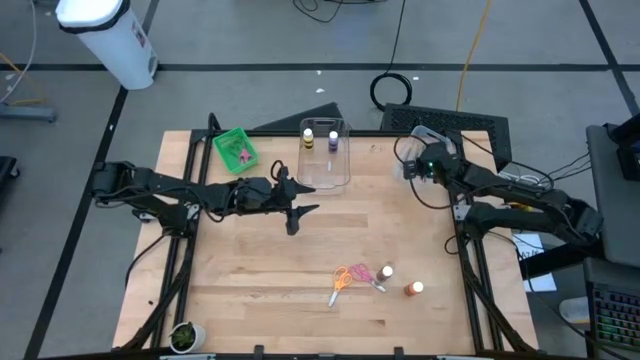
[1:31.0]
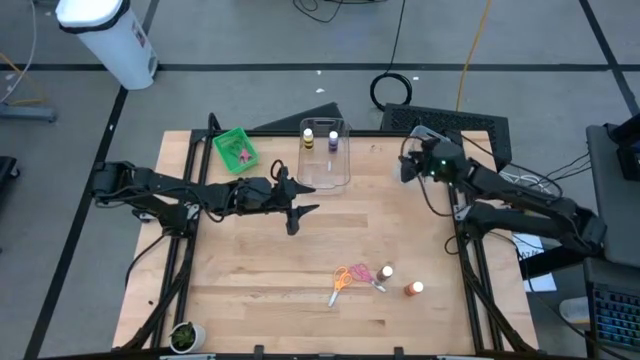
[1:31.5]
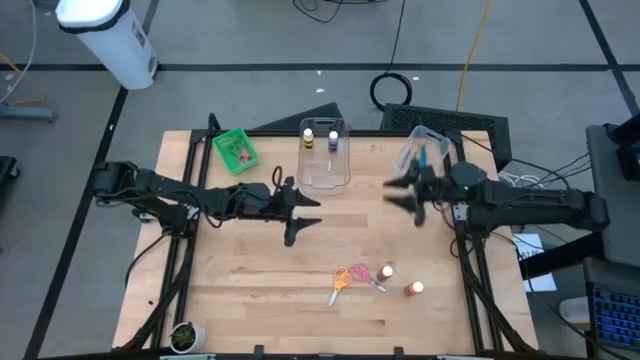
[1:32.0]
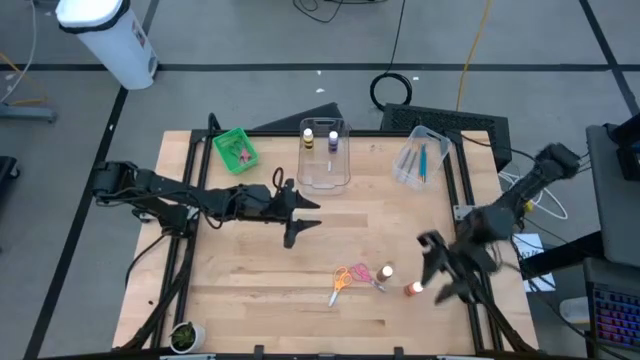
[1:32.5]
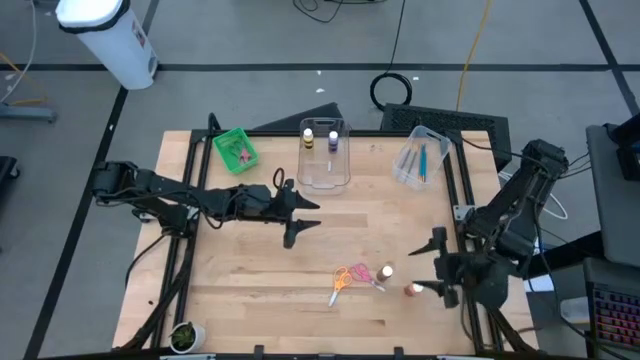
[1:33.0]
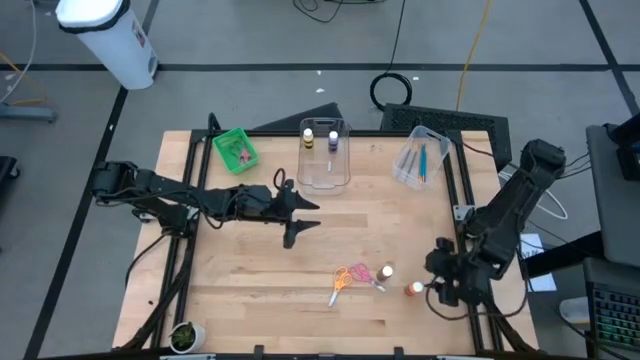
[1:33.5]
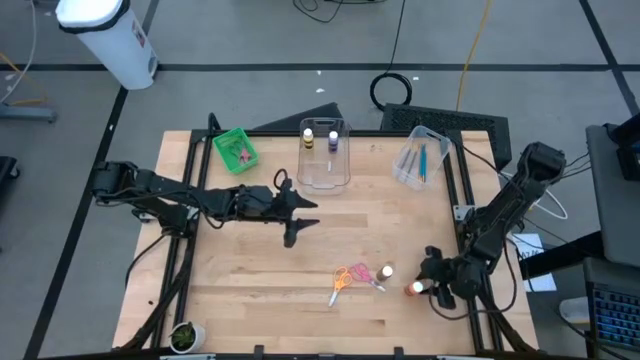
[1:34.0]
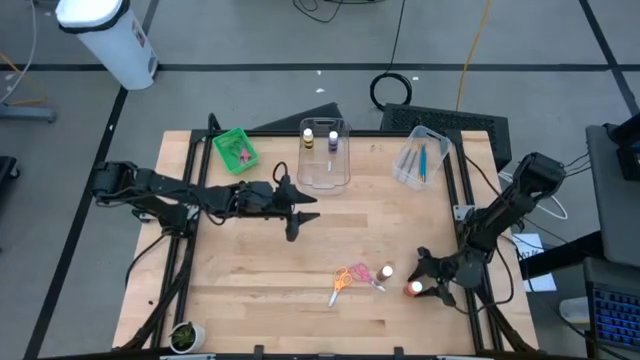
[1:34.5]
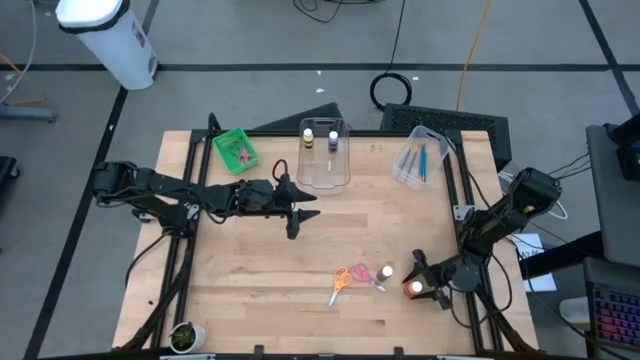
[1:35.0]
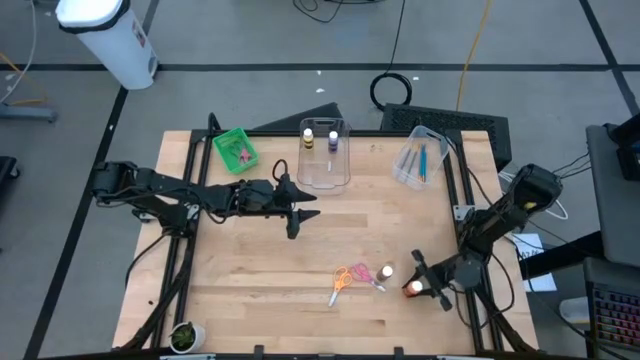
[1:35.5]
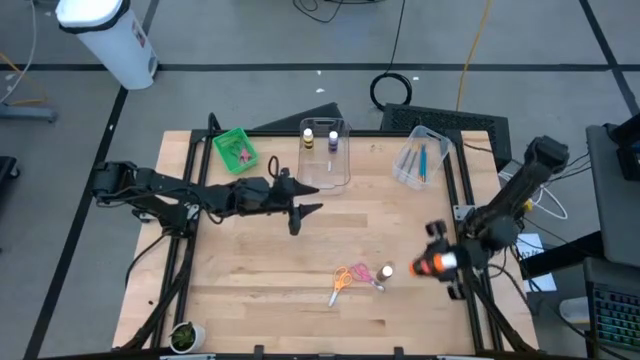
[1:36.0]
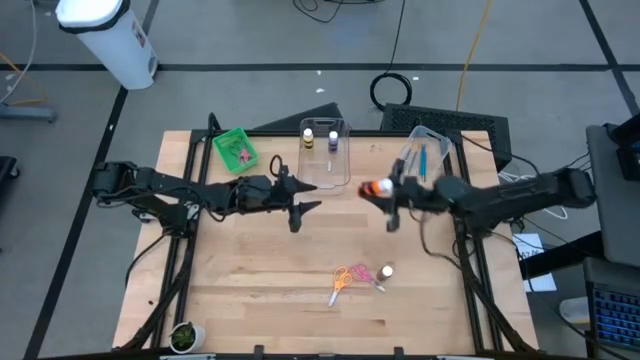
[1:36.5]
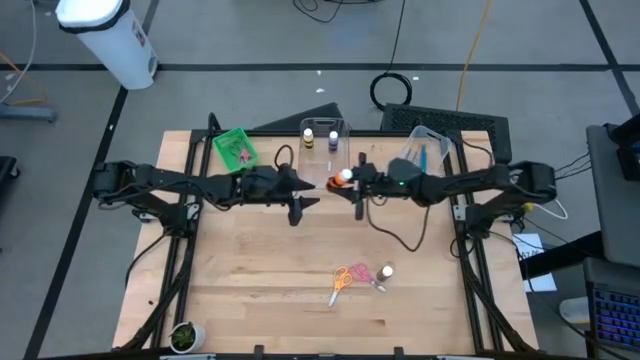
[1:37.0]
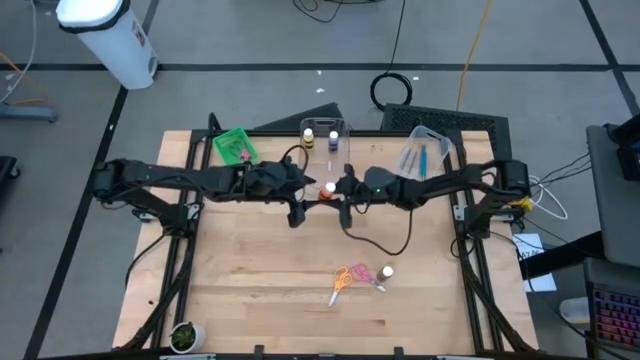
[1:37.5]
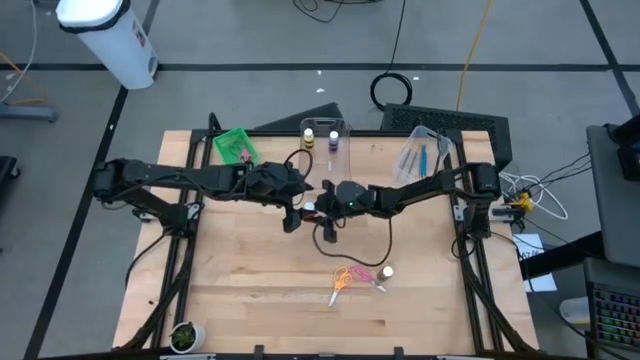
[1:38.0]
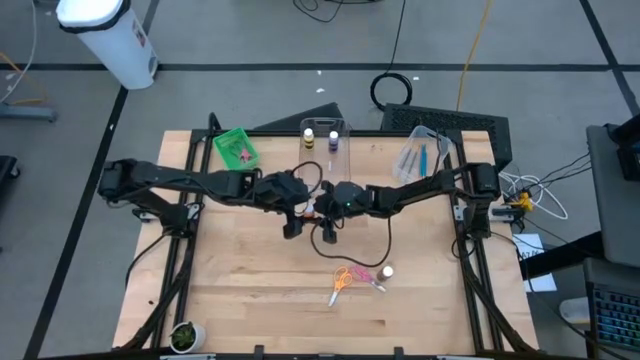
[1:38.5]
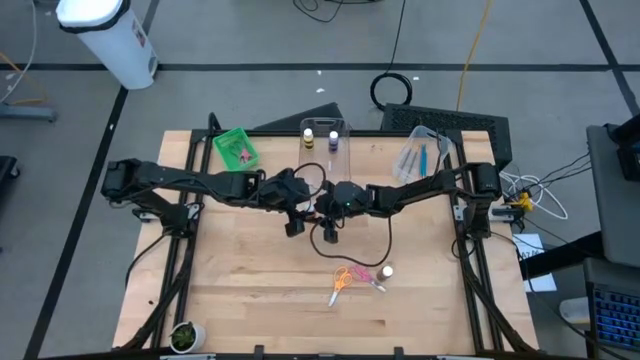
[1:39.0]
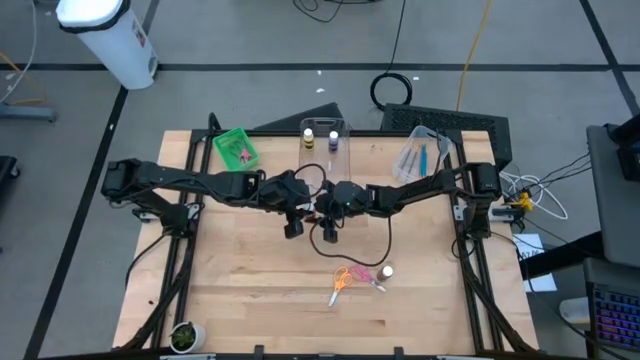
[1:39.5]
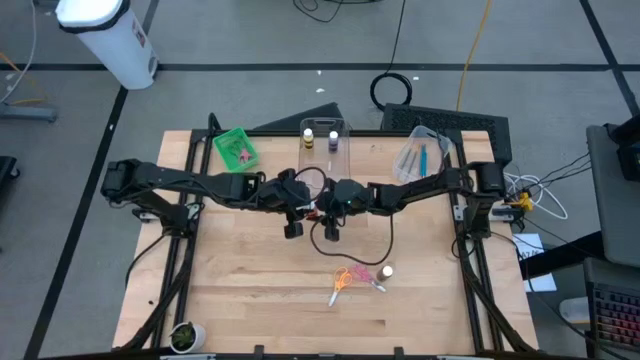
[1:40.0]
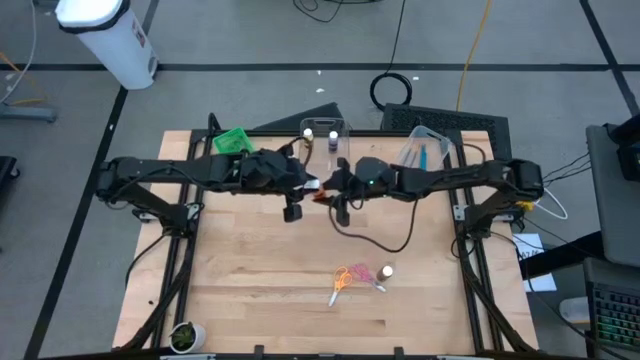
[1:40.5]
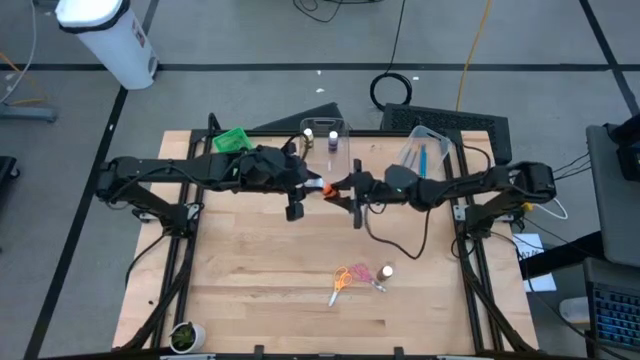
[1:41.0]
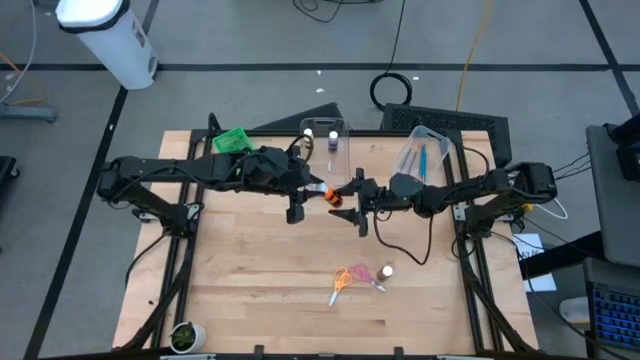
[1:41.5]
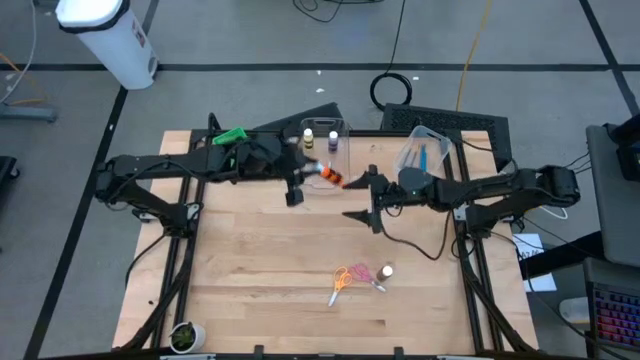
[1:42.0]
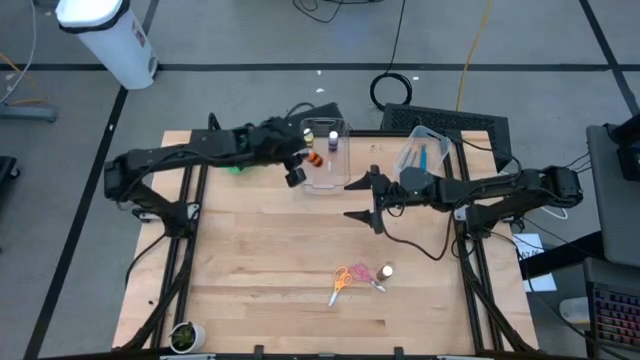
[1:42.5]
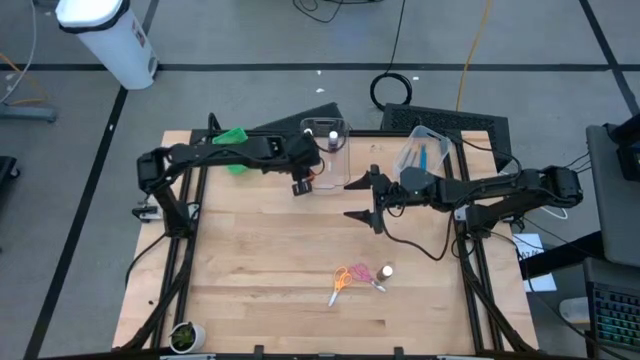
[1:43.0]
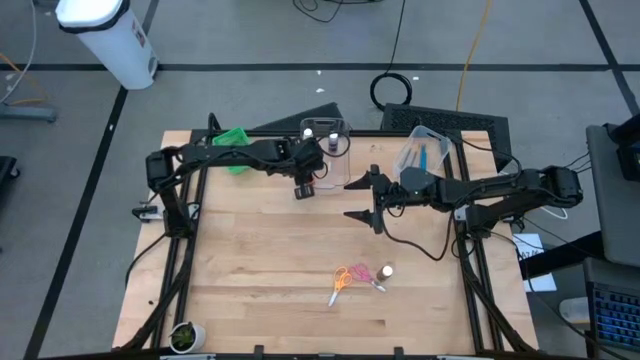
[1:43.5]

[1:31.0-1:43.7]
Task: Pick & Place Paint Supplies
Put the orange paint bottle into the transparent bin

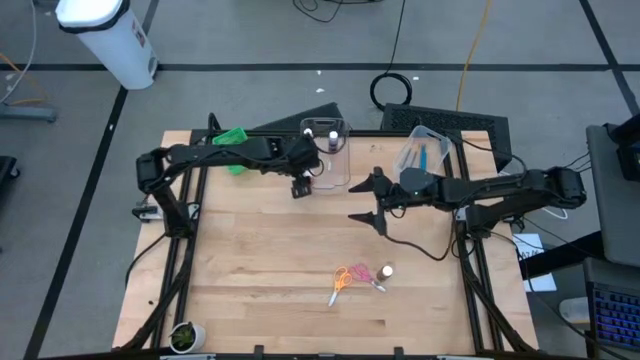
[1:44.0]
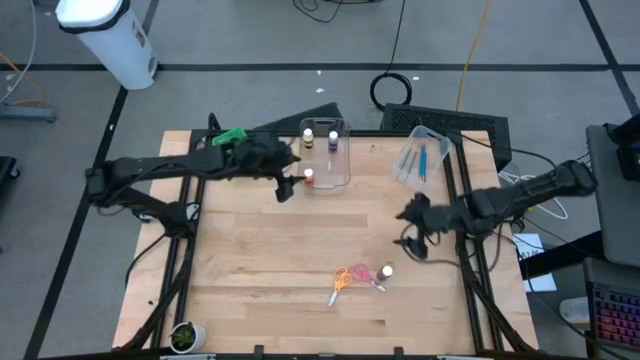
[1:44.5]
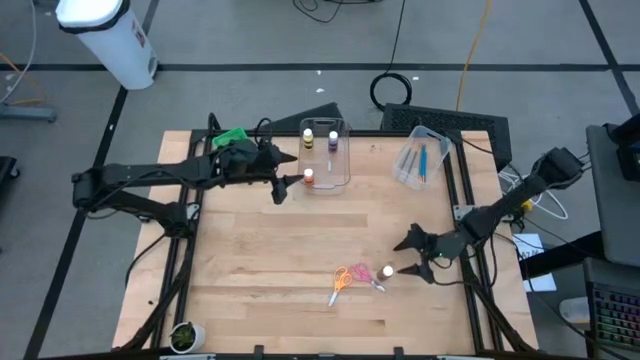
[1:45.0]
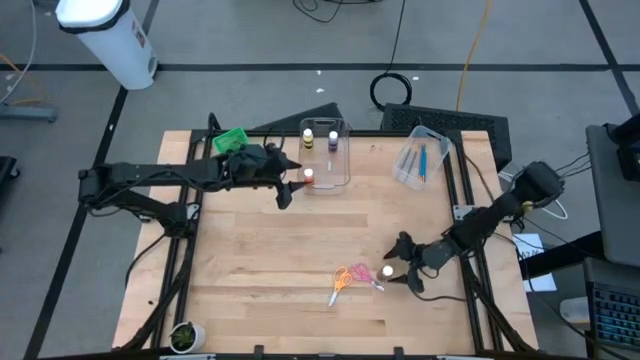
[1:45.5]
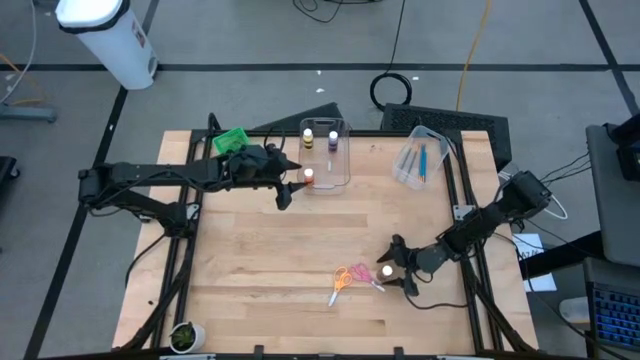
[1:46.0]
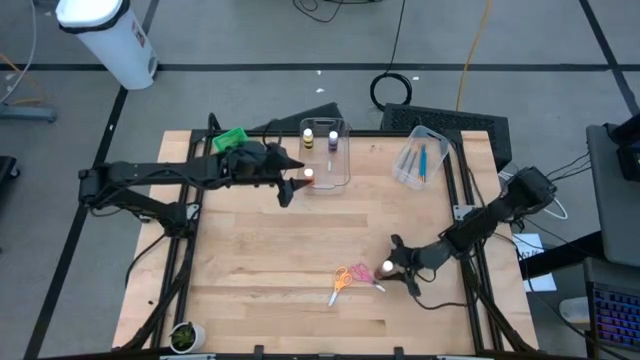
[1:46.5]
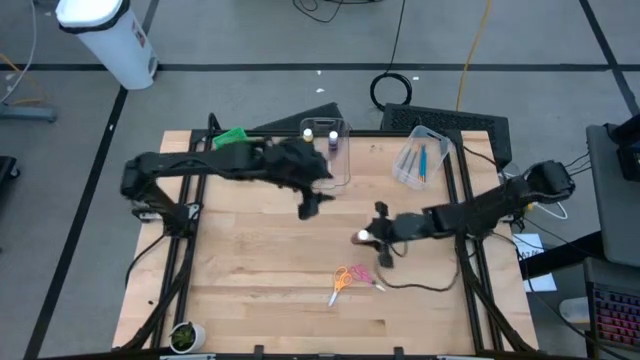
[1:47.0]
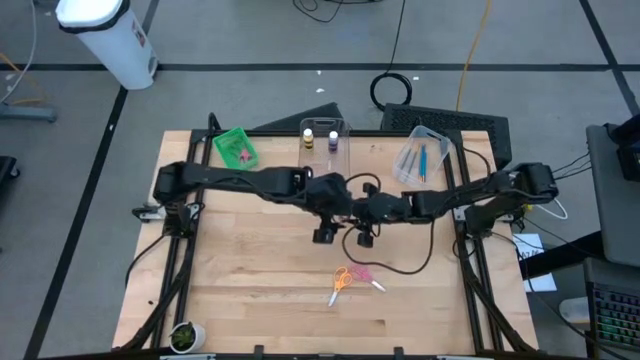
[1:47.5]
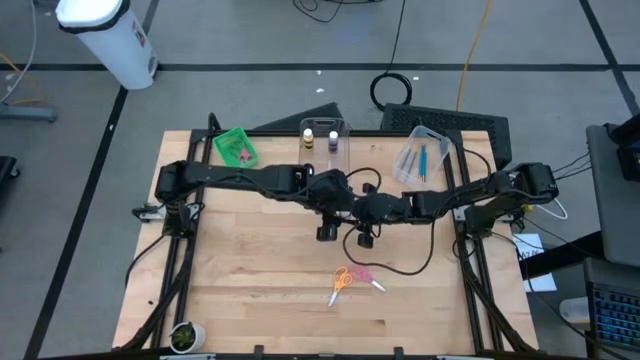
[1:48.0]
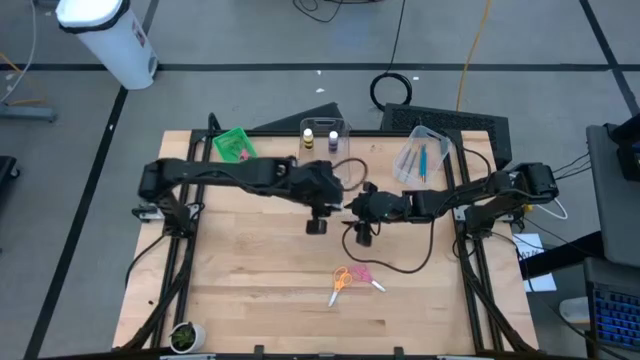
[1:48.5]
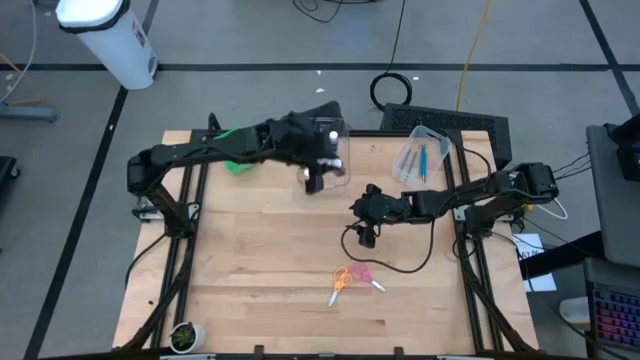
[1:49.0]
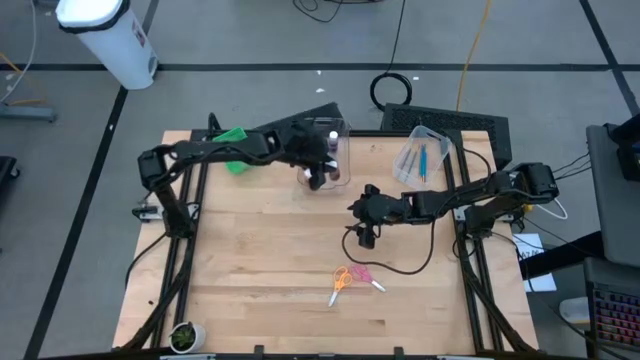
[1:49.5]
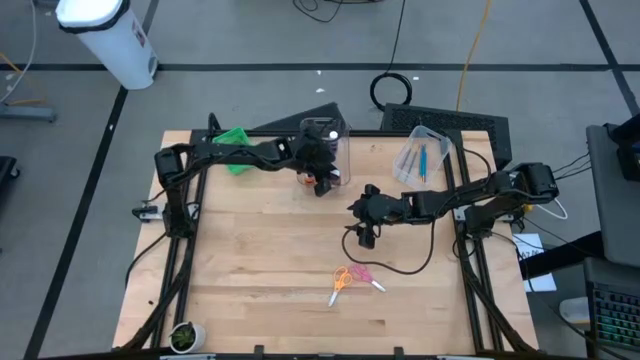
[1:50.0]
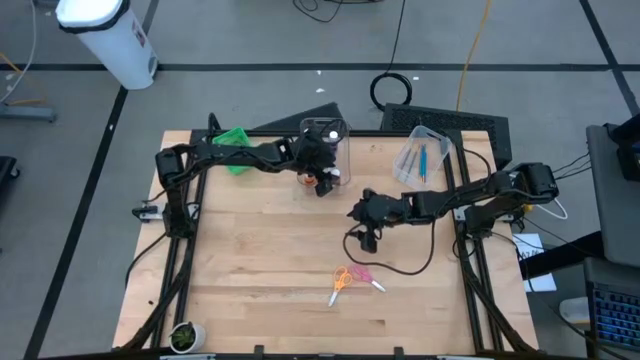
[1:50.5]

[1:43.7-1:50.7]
Put the brown paint bottle into the transparent bin

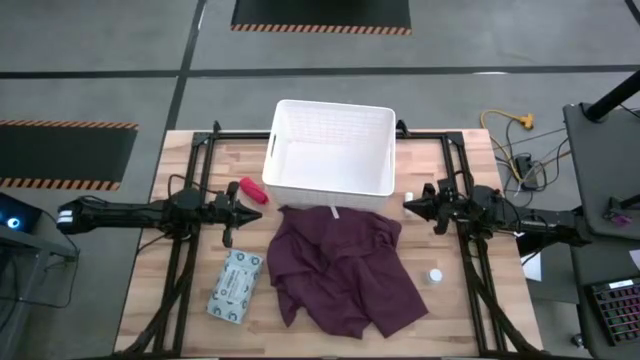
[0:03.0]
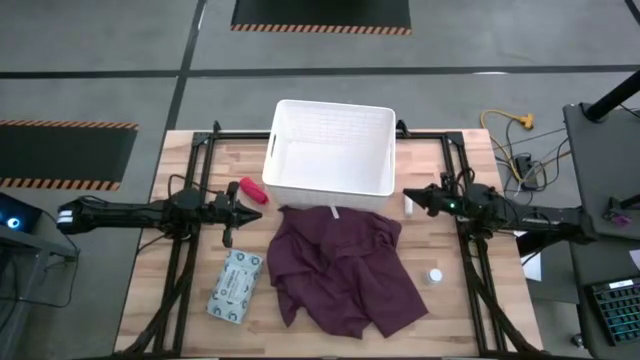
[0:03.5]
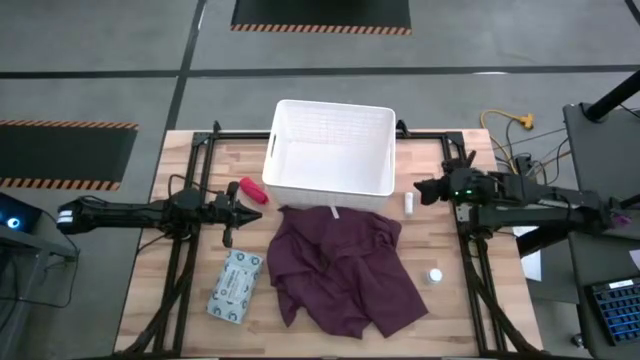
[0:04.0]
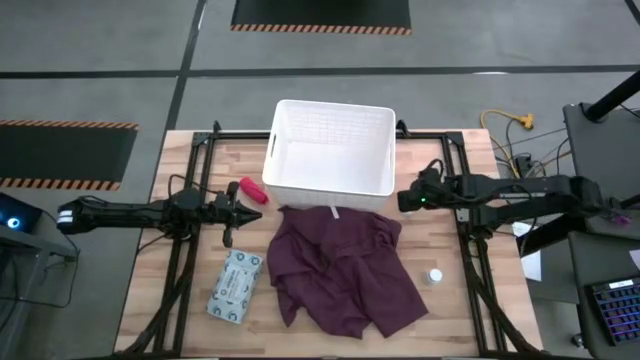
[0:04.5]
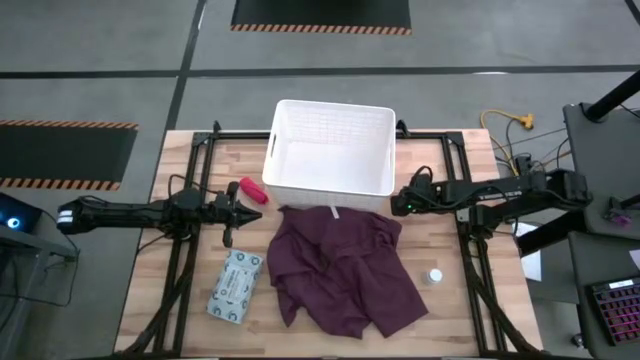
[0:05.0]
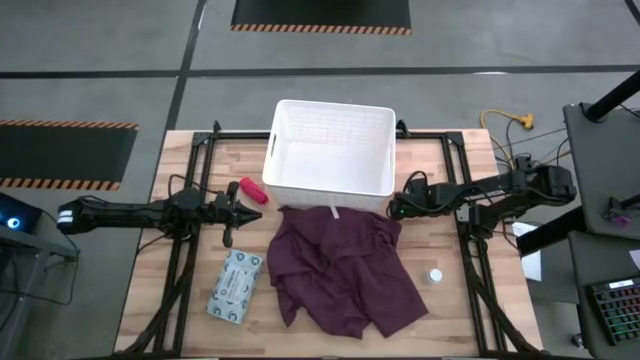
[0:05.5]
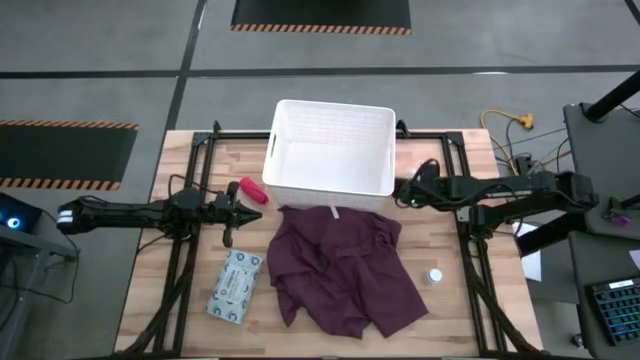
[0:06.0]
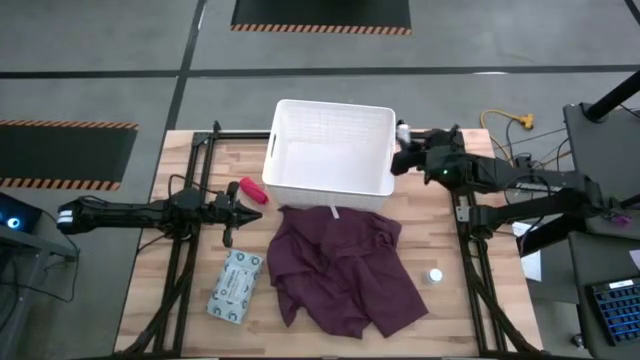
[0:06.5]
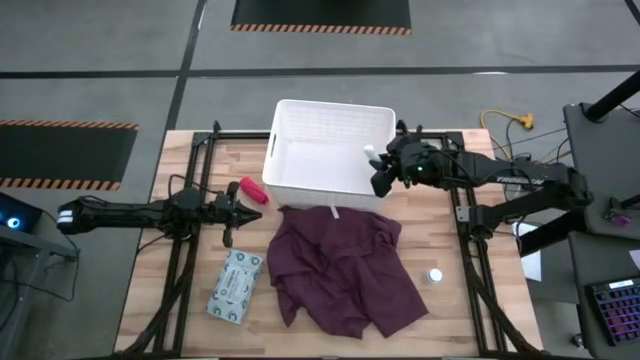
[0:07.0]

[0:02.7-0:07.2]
Task: Pick & place medical supplies in basket/bin
Put the white bandage into the white basket
